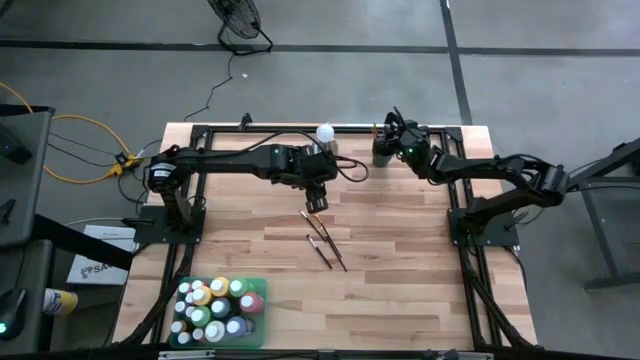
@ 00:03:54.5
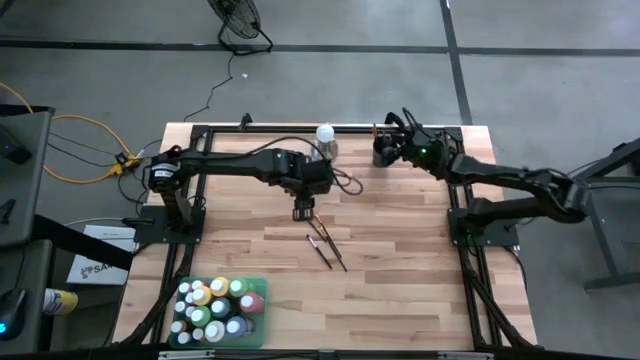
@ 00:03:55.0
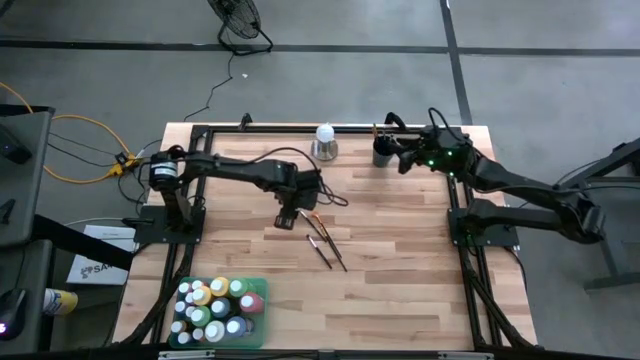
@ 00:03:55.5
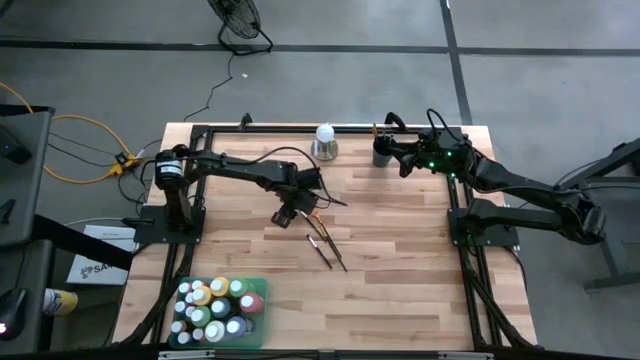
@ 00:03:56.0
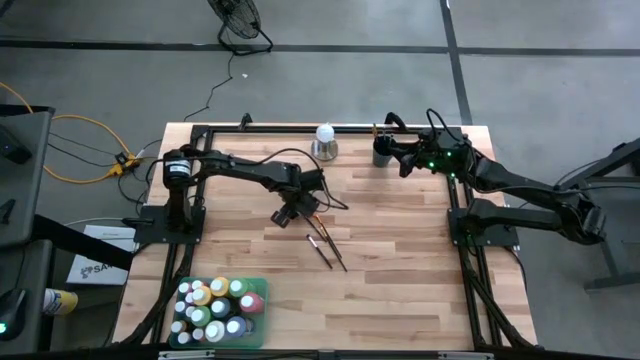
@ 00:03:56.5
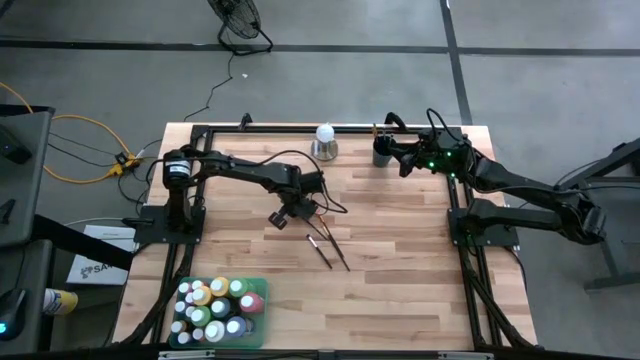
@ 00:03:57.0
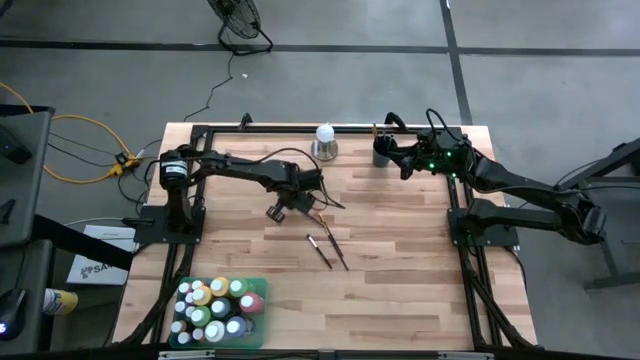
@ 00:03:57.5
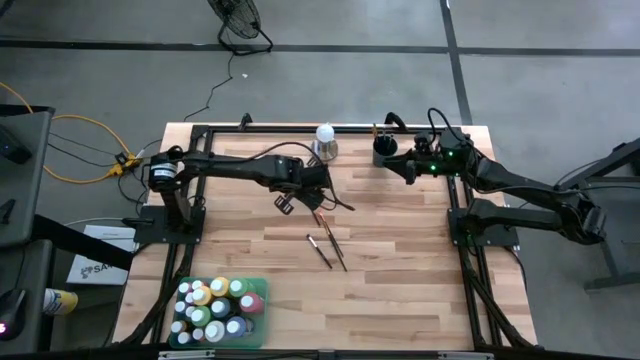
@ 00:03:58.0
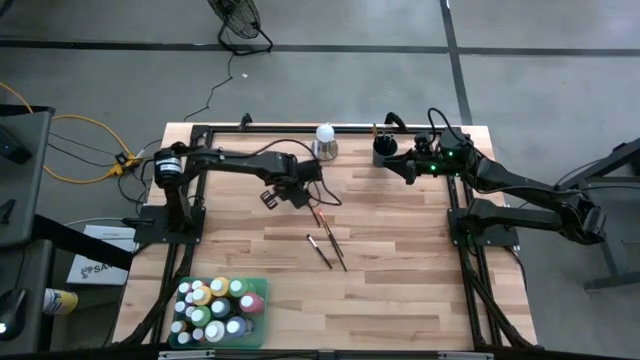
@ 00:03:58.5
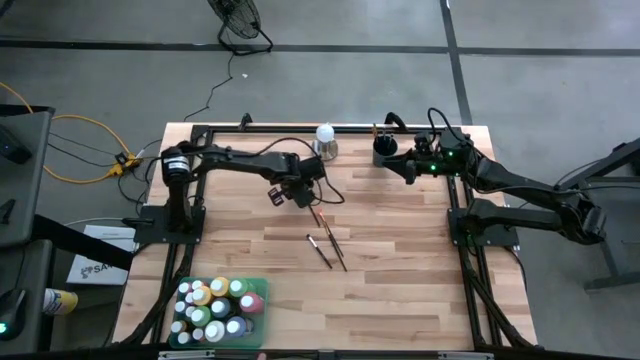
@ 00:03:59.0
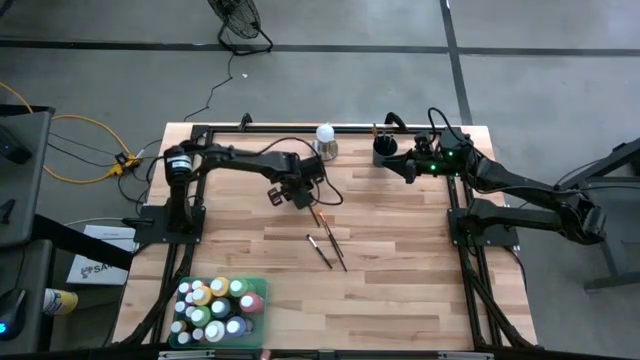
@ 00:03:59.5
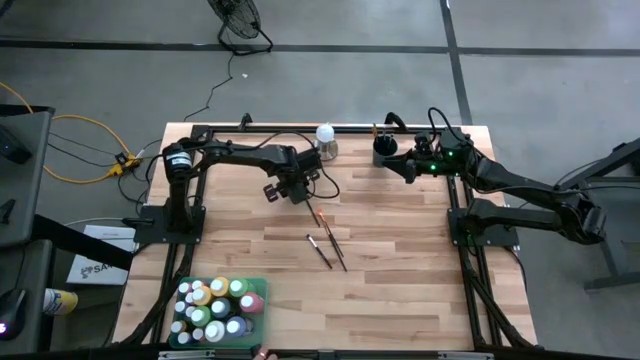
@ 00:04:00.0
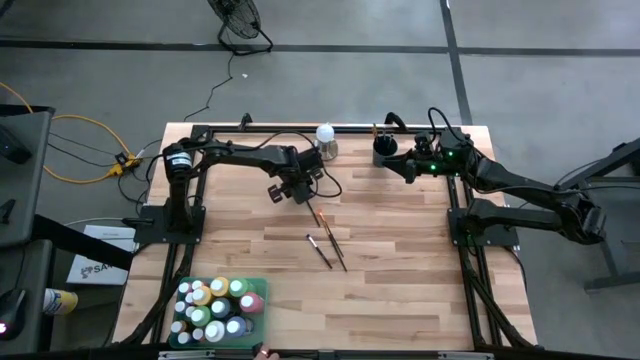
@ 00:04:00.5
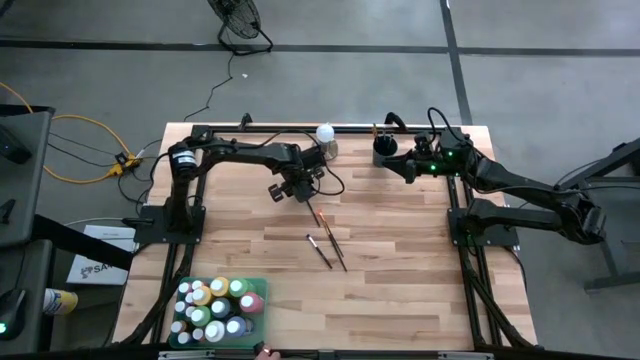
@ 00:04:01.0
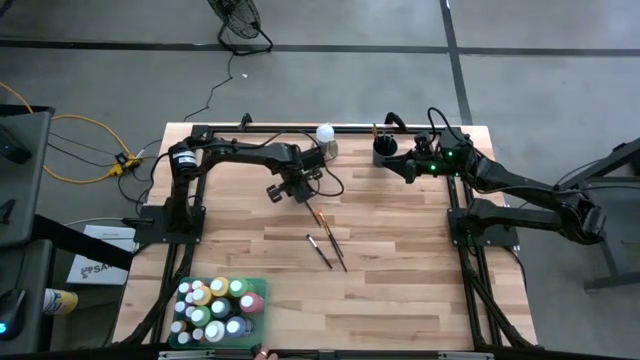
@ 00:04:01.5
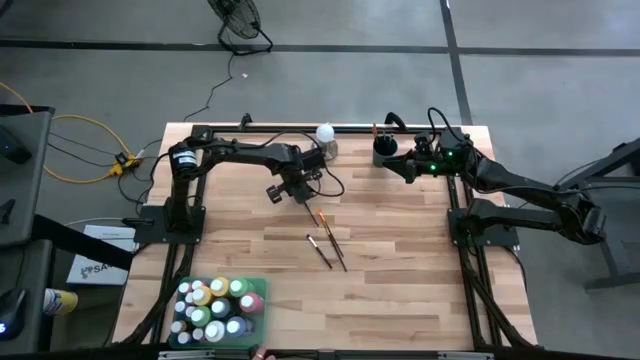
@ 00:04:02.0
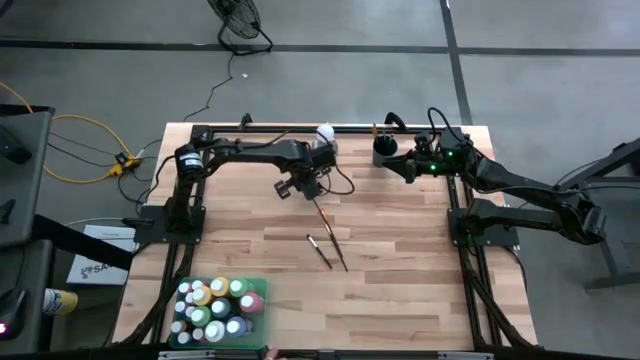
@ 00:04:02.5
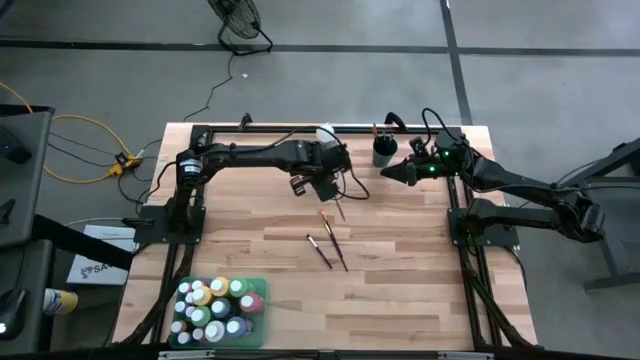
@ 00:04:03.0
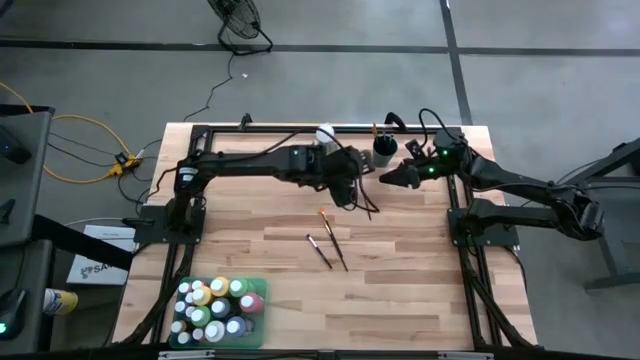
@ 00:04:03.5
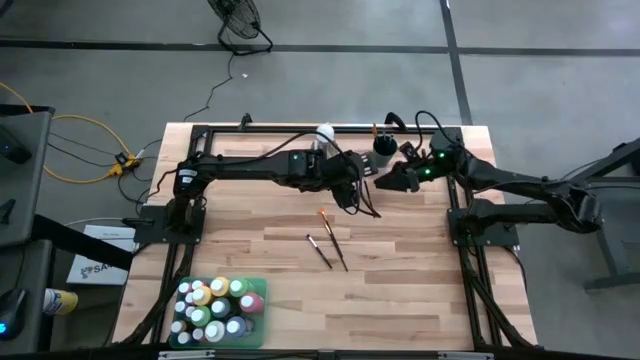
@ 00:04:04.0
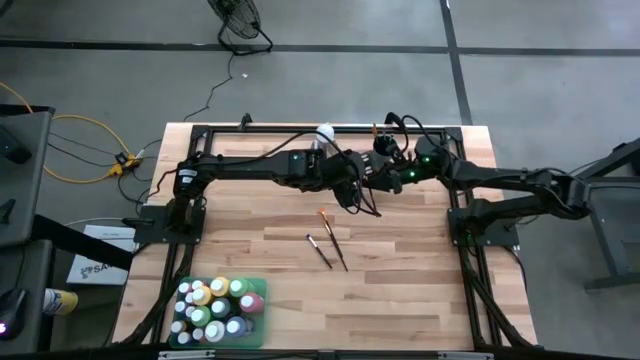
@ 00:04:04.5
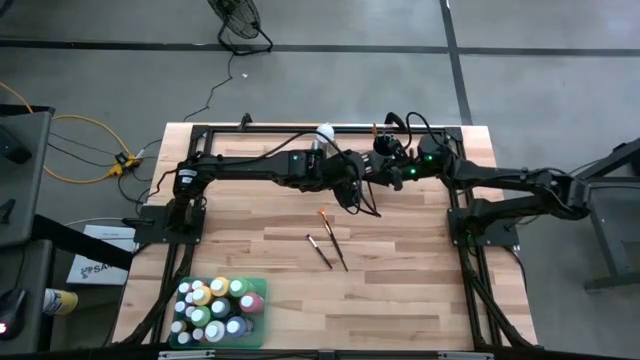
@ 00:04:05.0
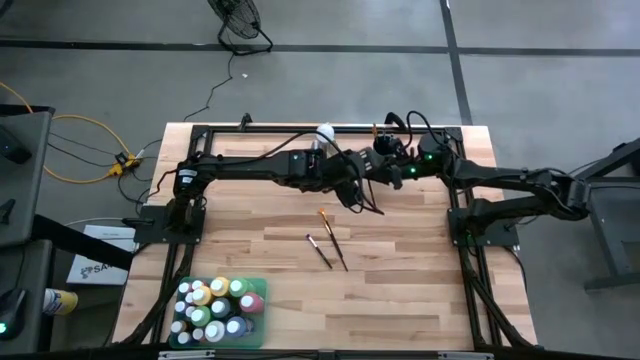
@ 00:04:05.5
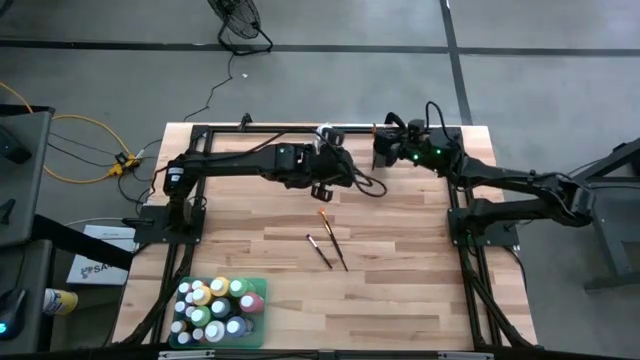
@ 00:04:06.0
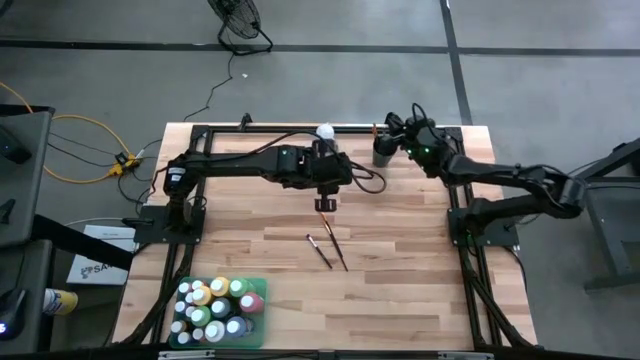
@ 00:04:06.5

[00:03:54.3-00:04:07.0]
Task: Pick & Place Paint Supplies
Put the silver paint brush into the black cup

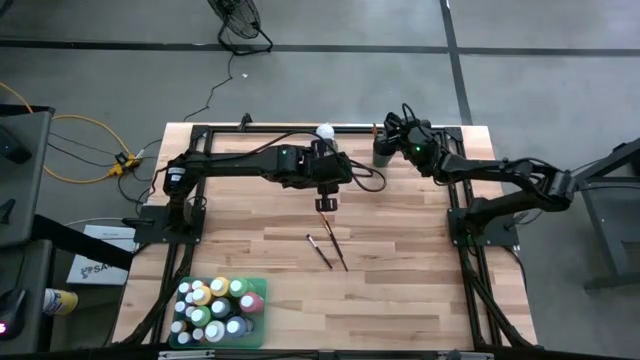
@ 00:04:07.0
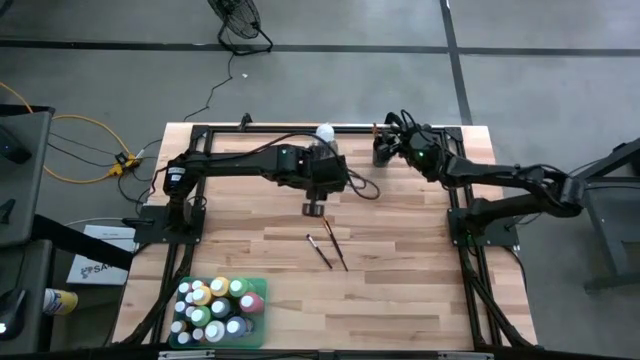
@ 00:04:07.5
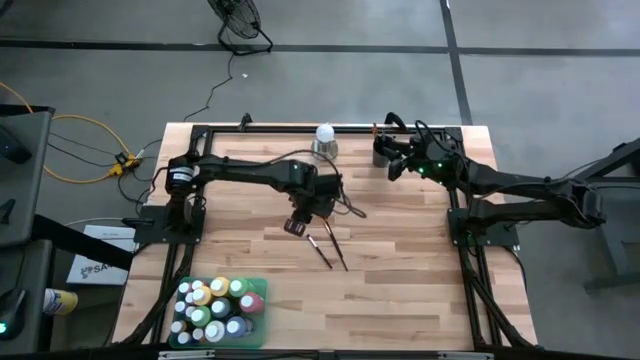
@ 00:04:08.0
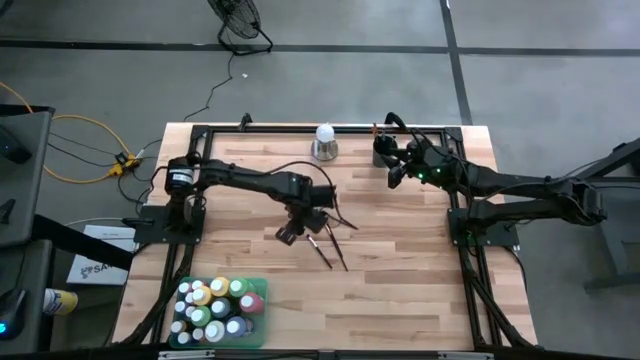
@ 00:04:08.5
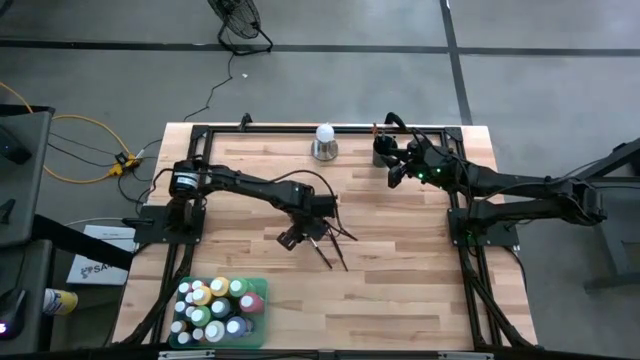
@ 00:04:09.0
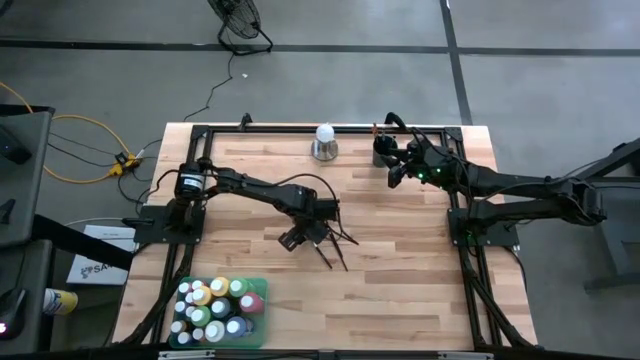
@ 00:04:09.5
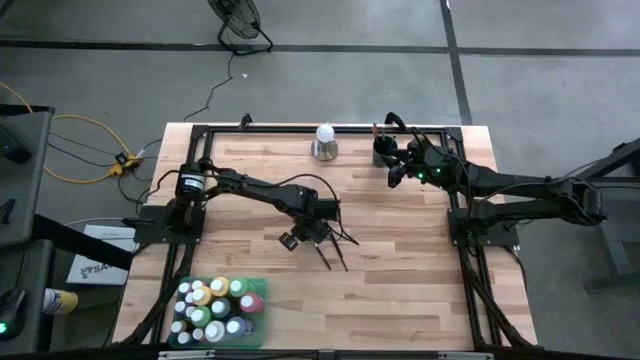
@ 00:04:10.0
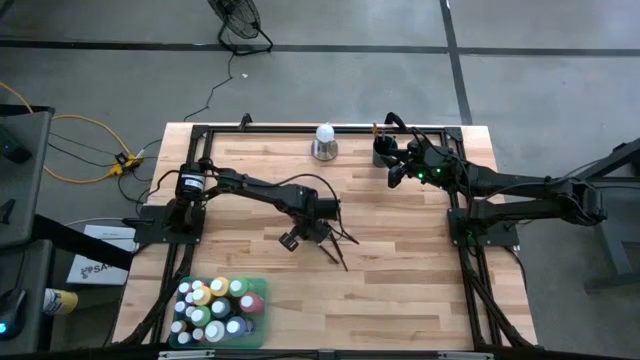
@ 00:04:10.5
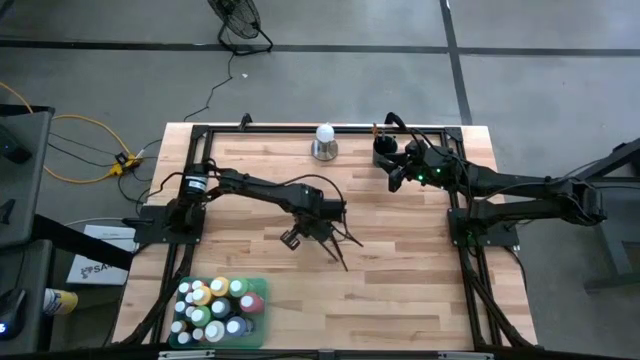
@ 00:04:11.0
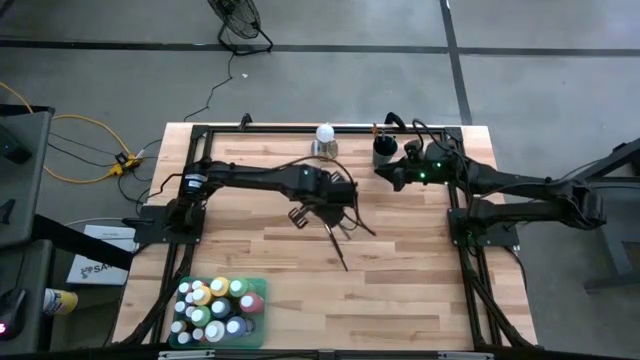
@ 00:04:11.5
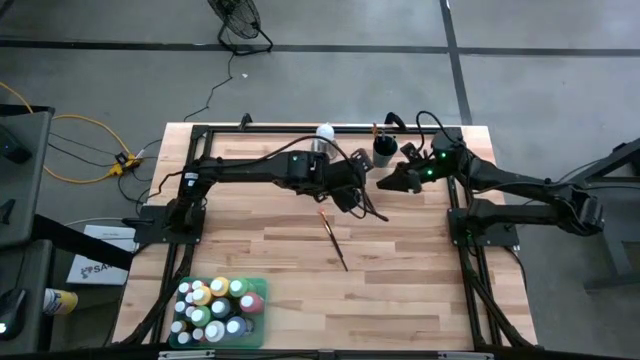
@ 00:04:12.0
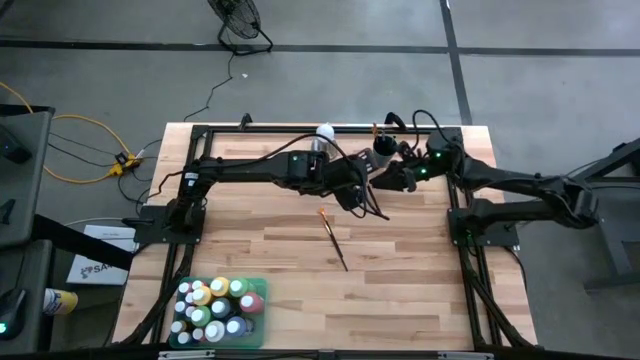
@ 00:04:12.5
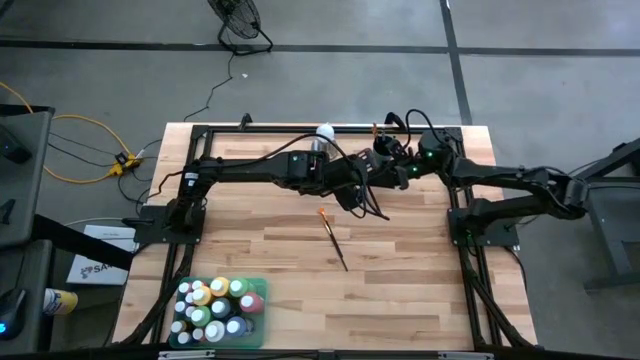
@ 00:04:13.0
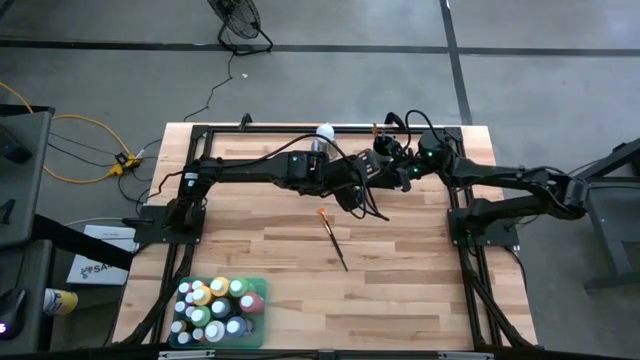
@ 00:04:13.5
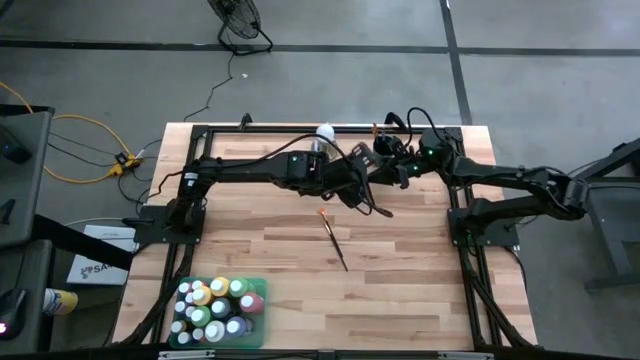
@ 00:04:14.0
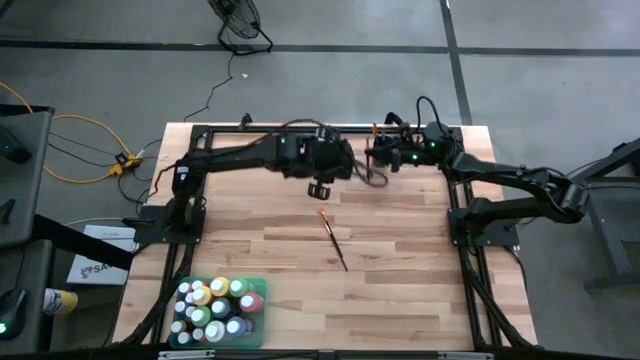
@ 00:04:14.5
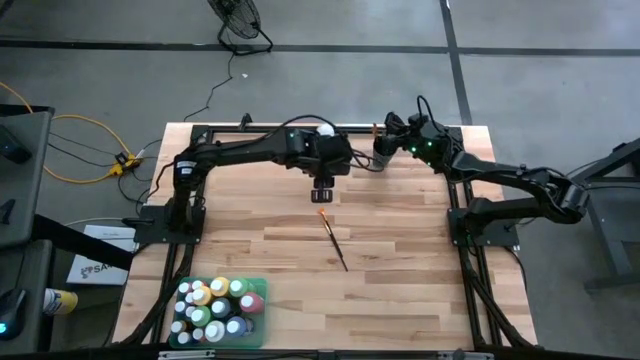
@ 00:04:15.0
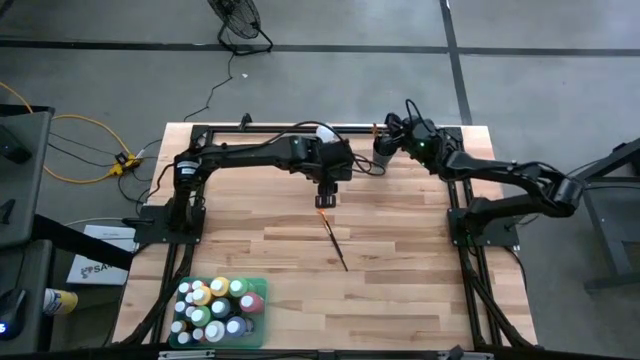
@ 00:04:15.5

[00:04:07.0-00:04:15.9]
Put the silver paint brush into the black cup
